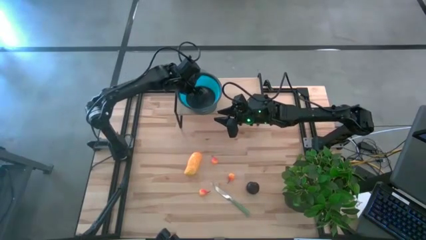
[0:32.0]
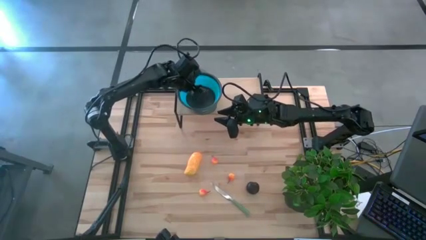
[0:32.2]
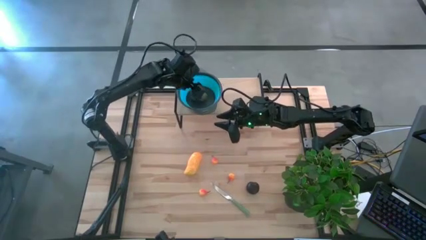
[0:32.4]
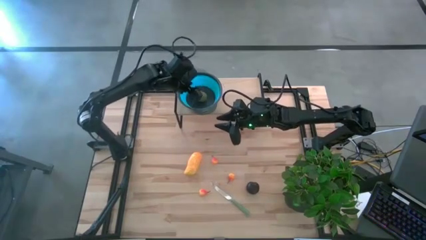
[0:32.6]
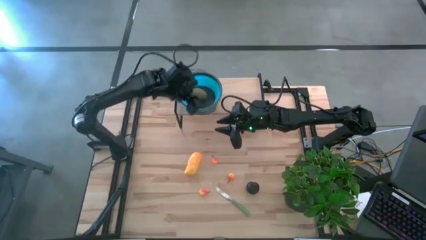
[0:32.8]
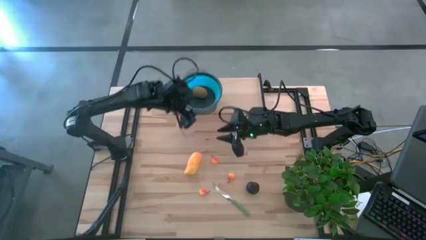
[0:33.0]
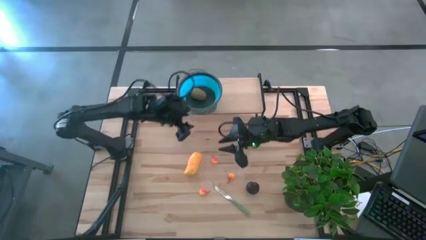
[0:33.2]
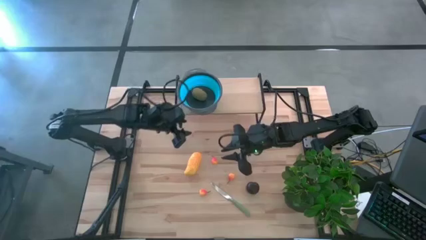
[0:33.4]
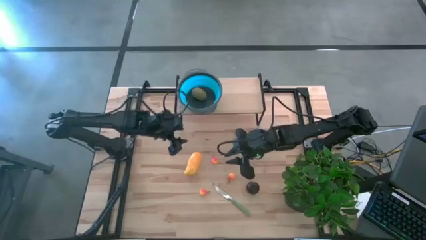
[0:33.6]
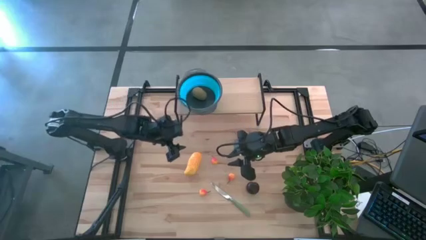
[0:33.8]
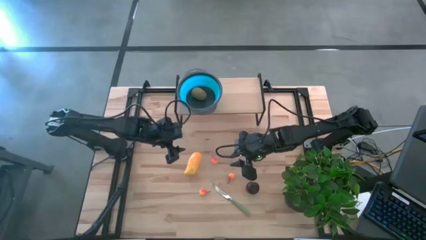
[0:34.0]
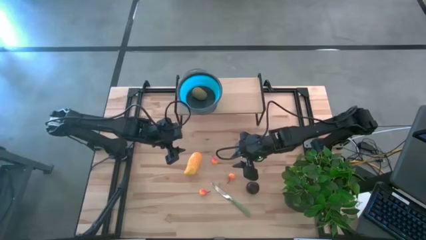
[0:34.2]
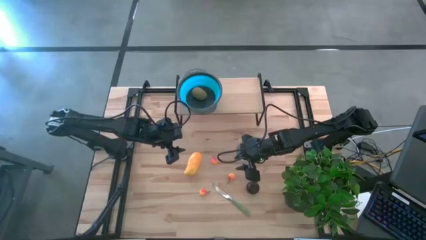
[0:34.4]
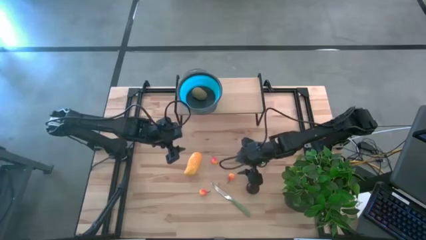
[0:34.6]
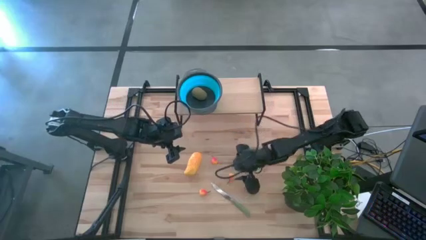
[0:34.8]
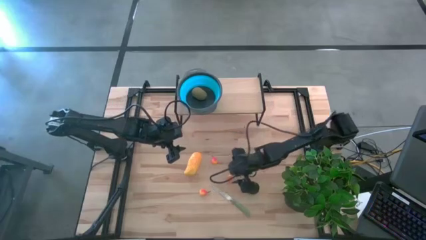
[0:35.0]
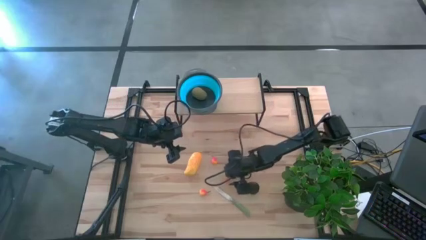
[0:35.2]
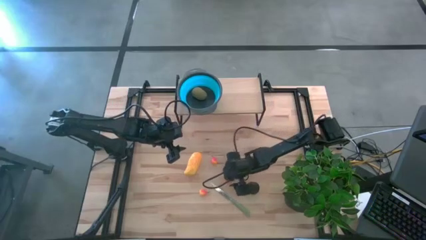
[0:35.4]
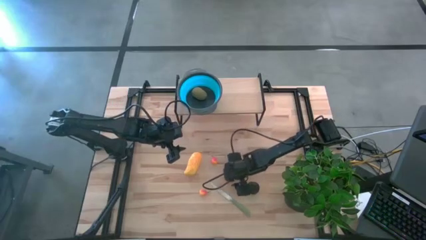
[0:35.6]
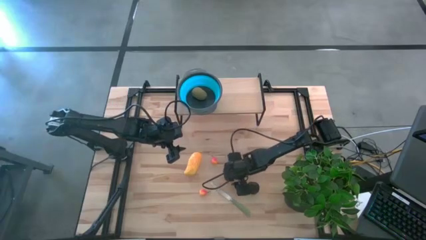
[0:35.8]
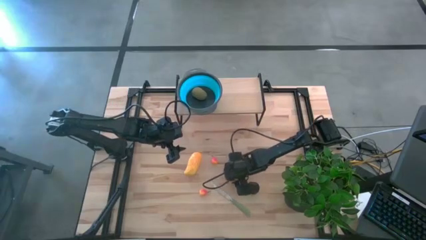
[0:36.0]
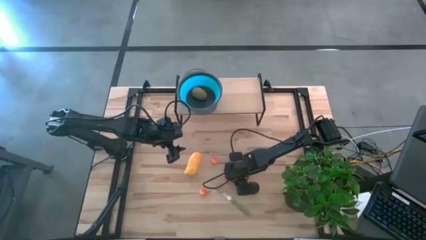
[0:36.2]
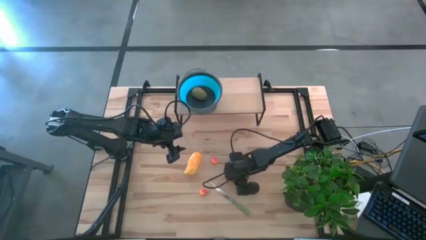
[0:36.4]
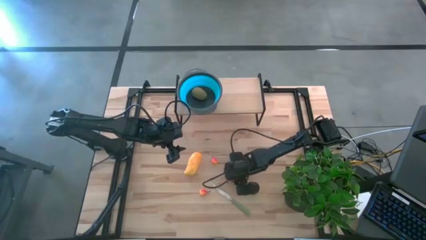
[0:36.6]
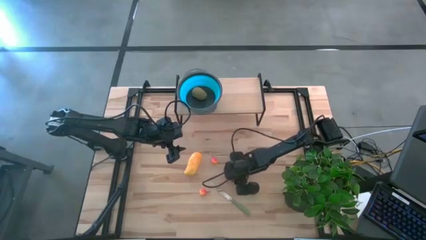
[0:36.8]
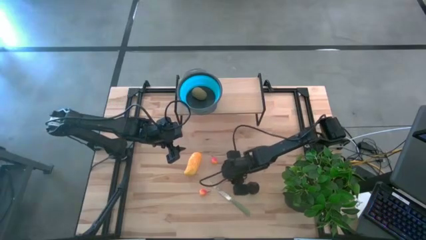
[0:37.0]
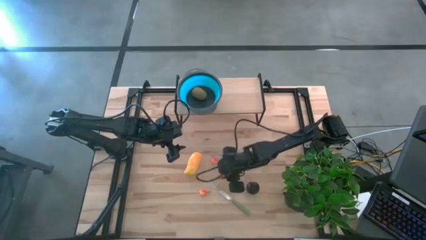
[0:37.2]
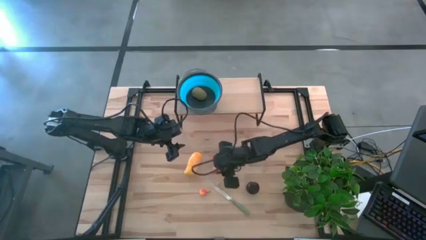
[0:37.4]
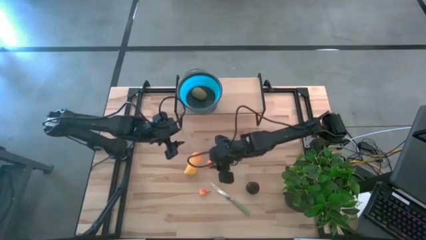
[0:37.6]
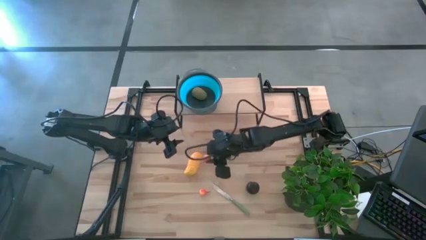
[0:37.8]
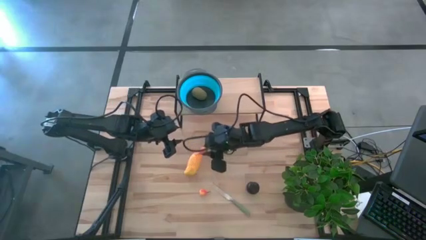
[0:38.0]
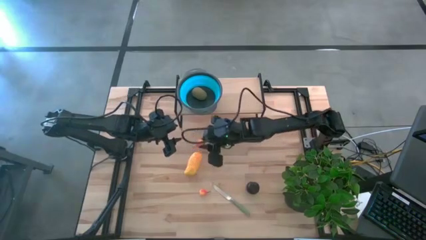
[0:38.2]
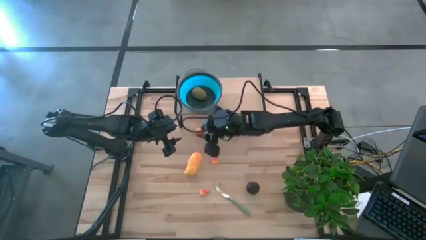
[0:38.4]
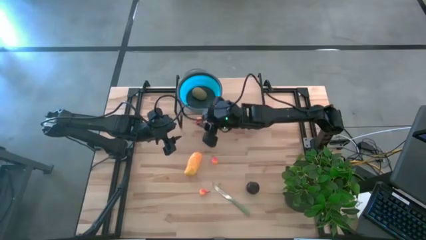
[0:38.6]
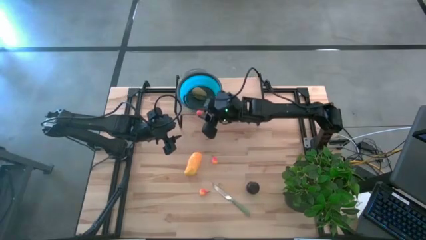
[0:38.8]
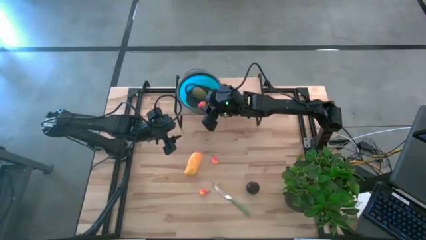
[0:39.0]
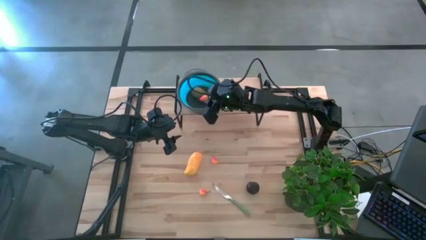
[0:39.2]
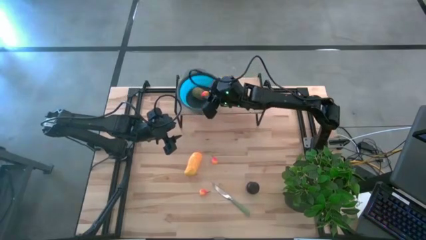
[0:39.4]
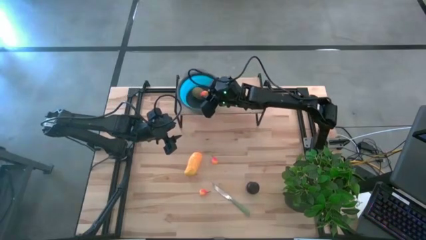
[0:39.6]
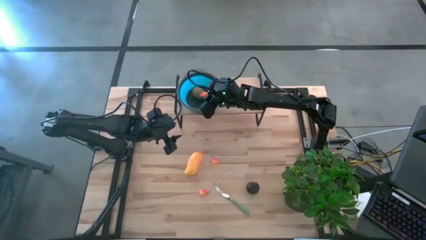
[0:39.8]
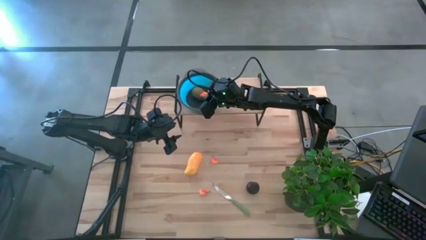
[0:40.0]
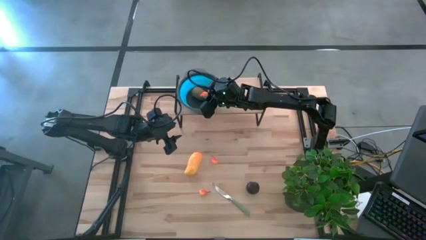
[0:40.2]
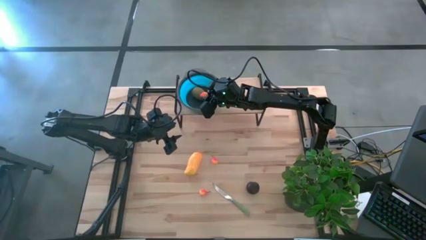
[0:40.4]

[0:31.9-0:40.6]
Task: Pick & Place Fruit
Put the middle pear into the blue strainer bowl on the shelf

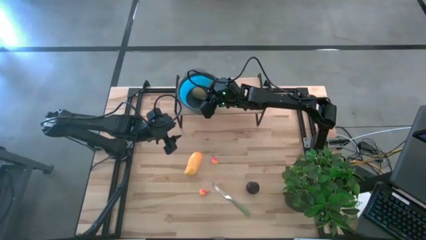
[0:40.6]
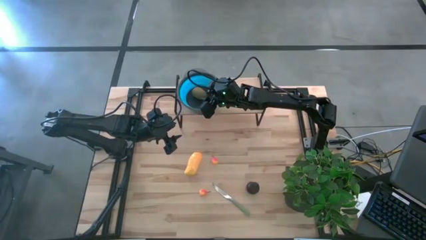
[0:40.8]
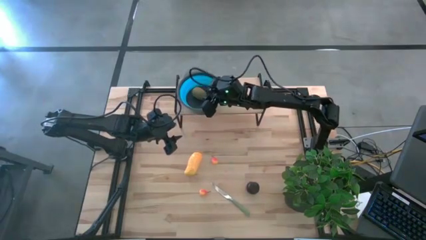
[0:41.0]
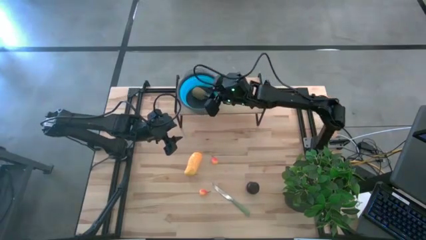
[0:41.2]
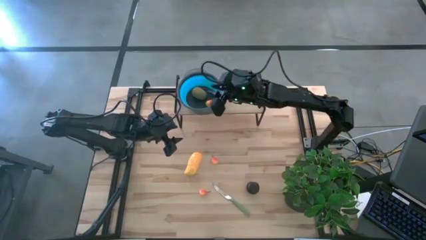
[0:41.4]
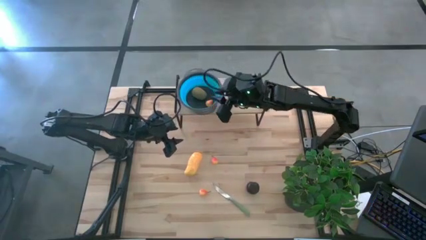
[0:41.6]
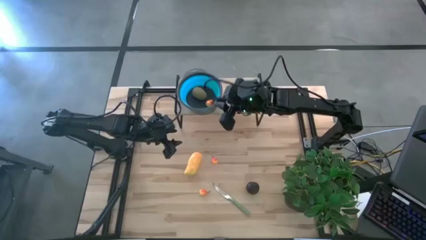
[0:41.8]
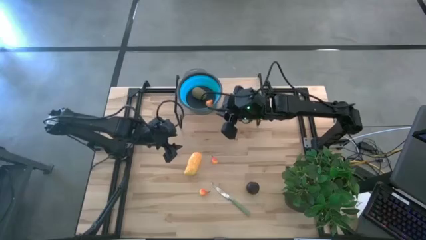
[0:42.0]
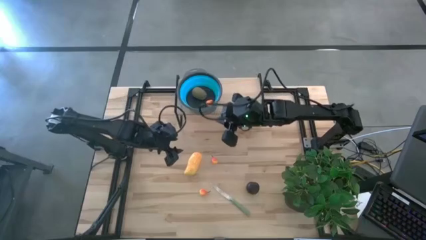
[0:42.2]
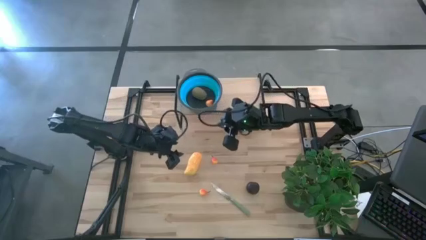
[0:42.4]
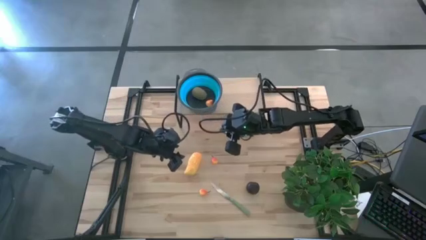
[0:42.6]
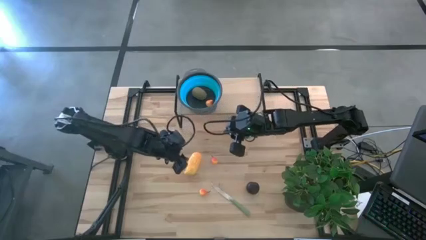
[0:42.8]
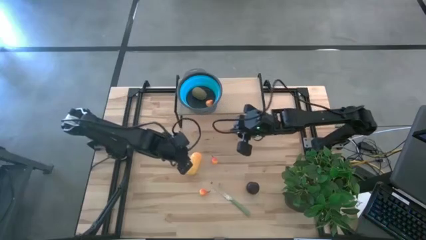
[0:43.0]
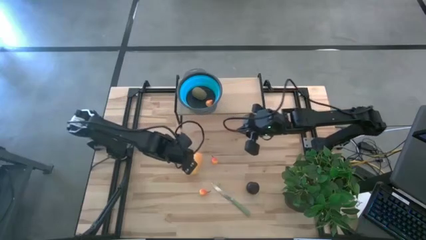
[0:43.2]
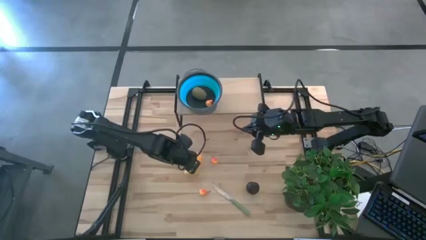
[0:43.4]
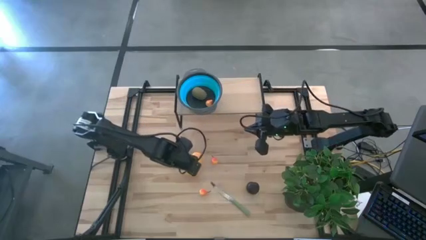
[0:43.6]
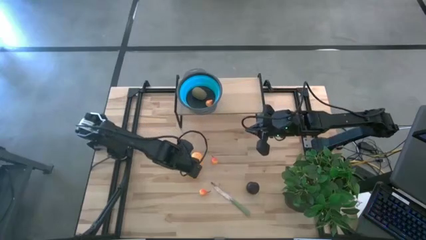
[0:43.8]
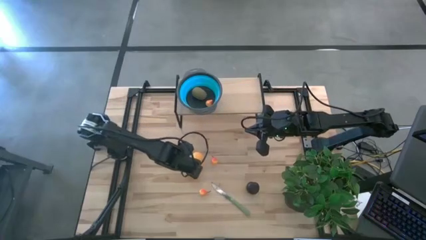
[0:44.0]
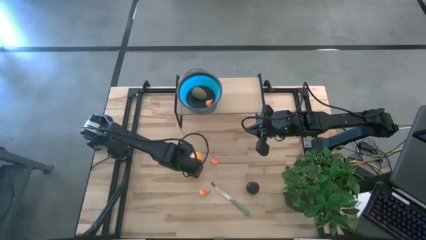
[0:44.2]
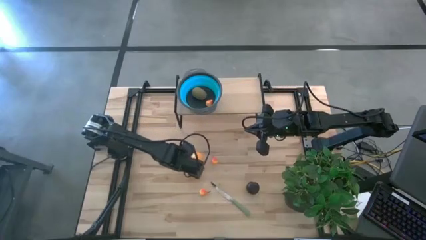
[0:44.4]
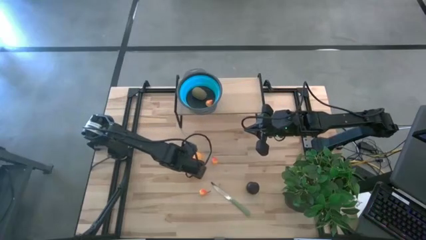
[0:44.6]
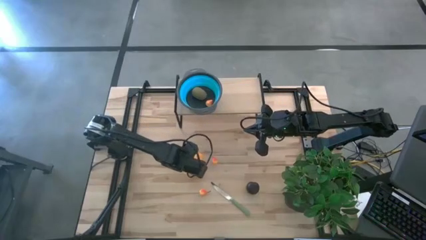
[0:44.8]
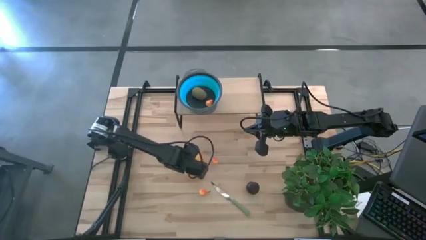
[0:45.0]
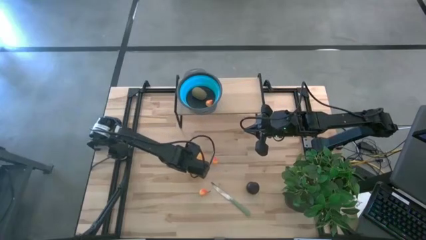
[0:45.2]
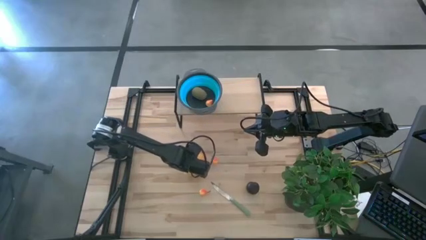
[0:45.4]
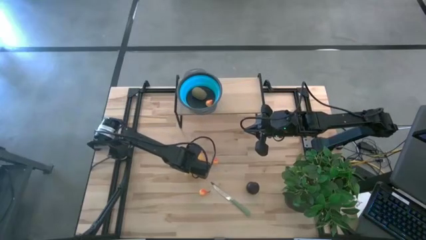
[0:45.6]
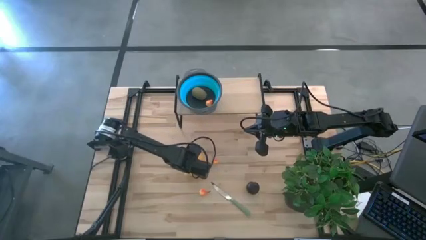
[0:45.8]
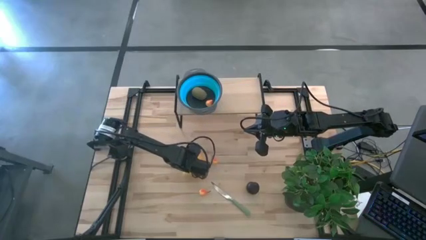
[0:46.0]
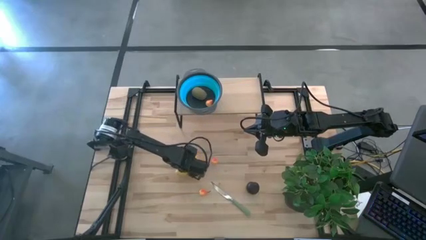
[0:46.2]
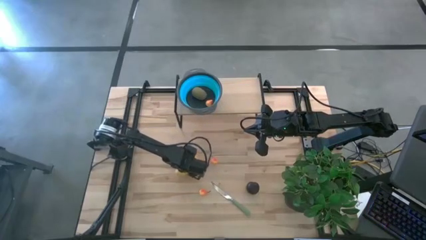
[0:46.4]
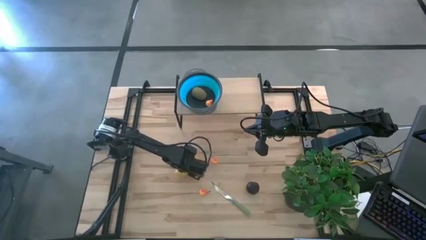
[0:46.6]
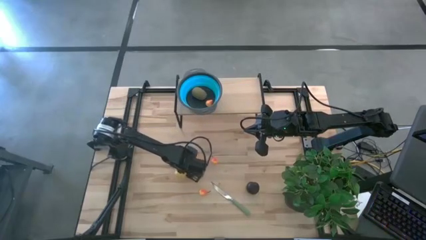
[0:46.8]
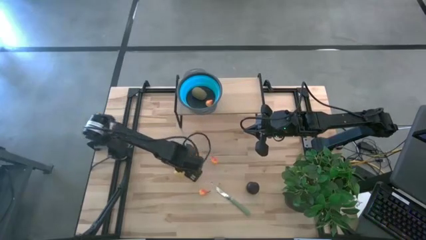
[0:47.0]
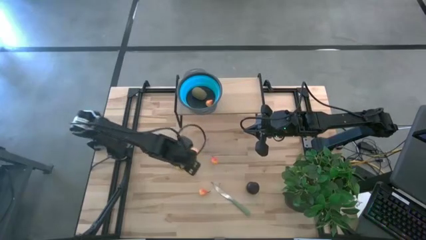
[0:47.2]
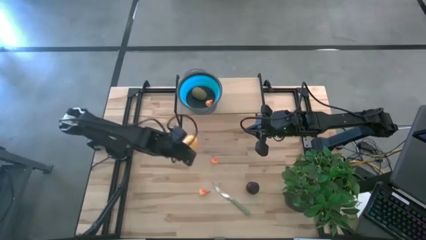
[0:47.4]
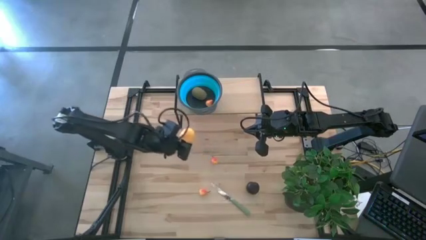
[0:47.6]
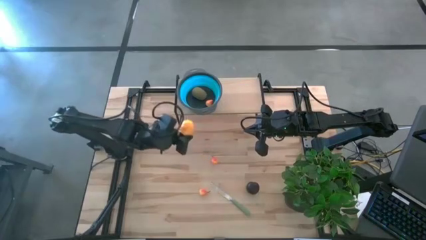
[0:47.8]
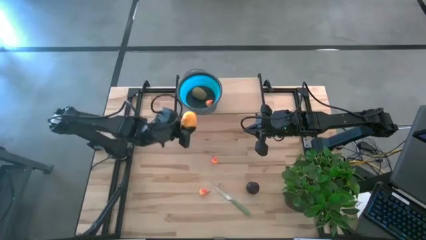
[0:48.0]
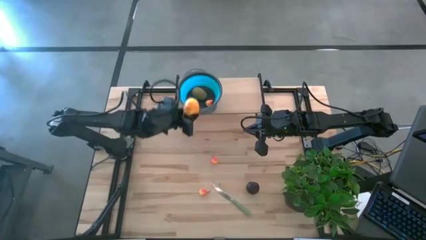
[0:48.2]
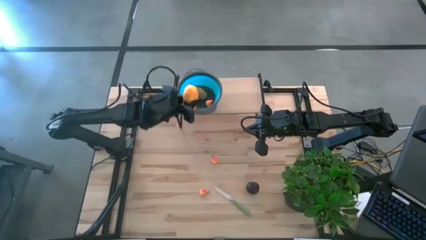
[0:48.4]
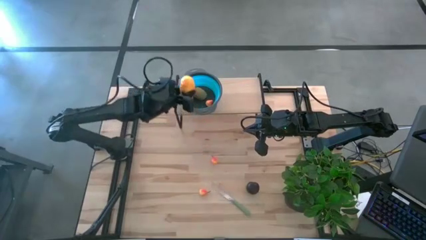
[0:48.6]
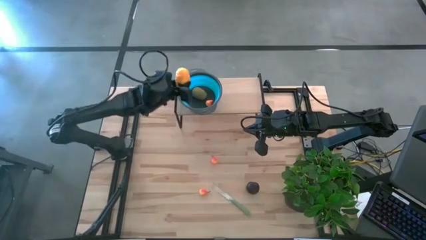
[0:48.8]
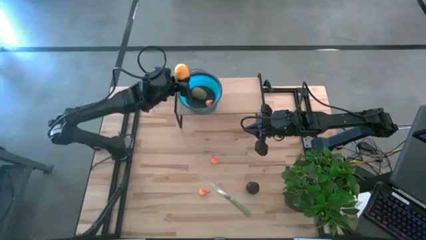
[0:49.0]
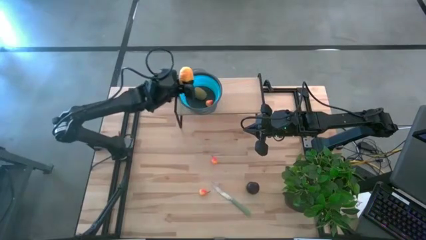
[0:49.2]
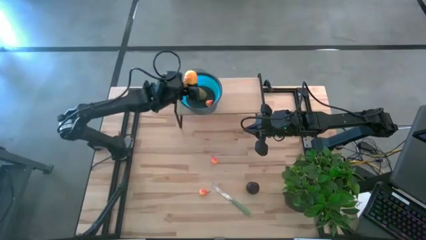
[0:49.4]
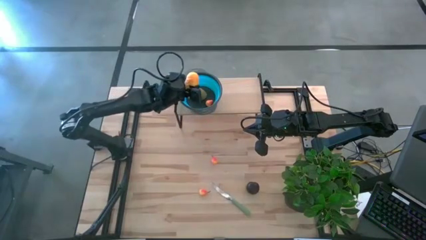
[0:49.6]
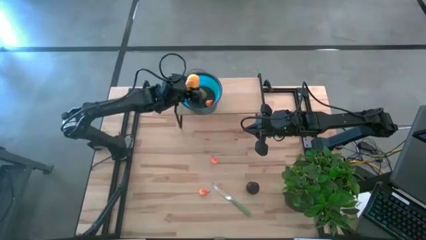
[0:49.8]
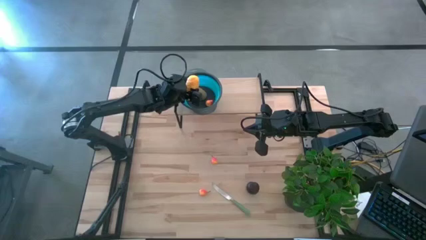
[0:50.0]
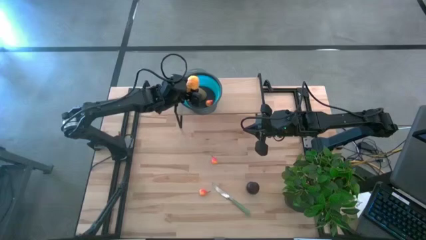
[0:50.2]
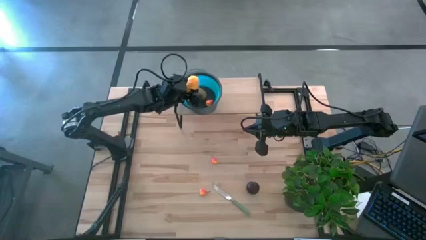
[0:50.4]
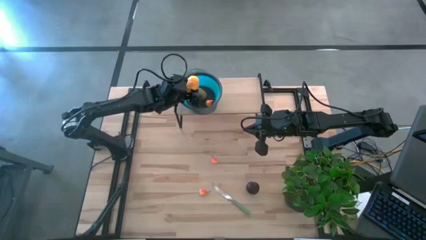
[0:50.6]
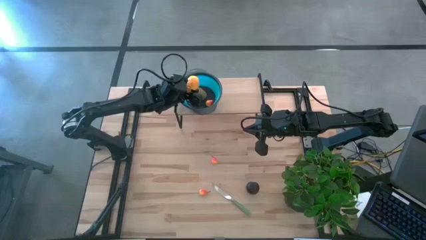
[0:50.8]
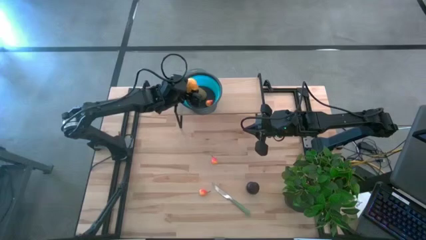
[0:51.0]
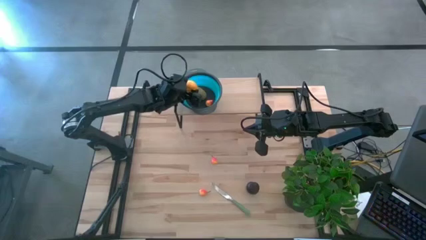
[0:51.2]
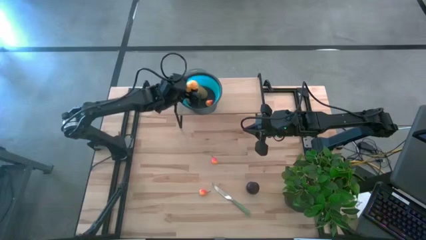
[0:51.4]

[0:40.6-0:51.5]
Put the mango into the blue strainer bowl on the shelf
